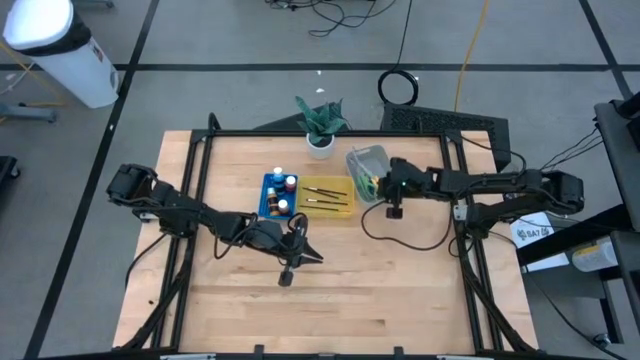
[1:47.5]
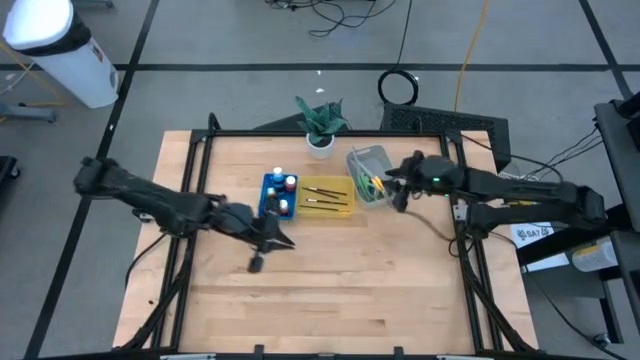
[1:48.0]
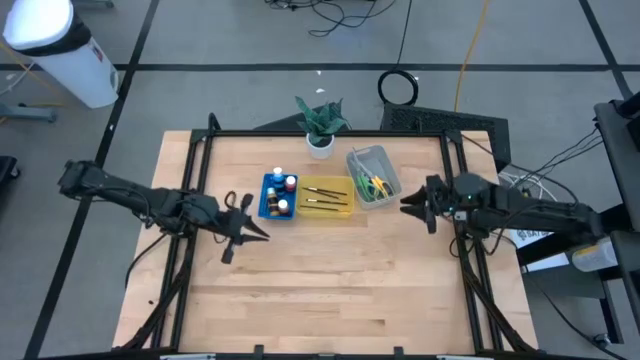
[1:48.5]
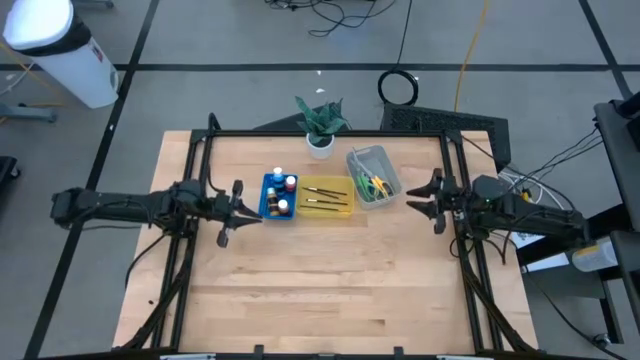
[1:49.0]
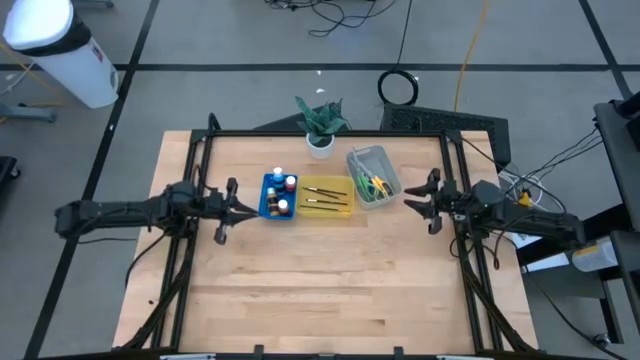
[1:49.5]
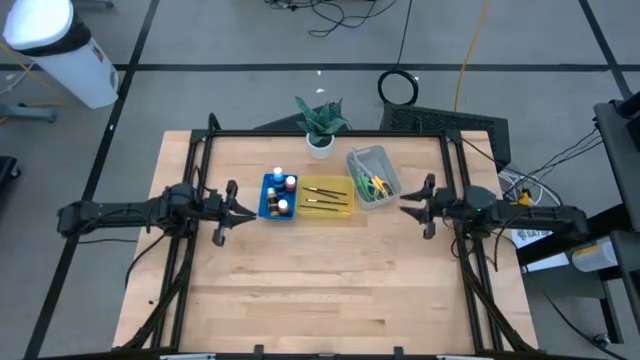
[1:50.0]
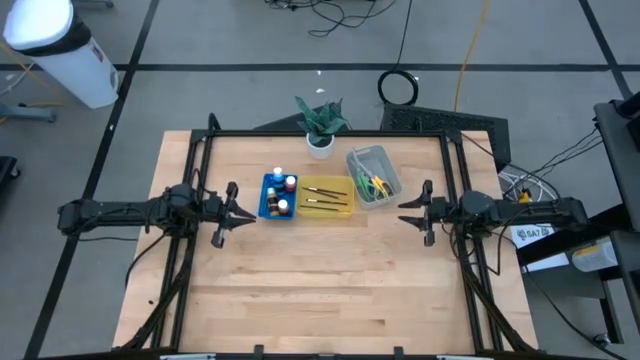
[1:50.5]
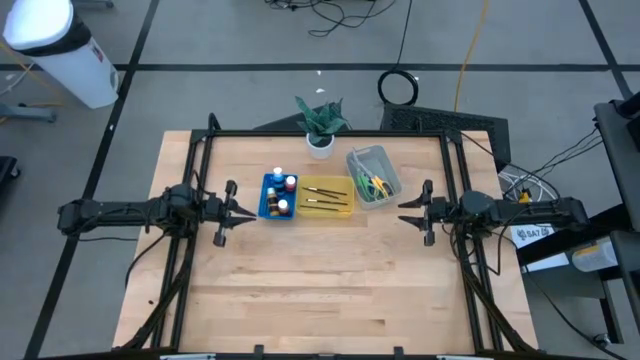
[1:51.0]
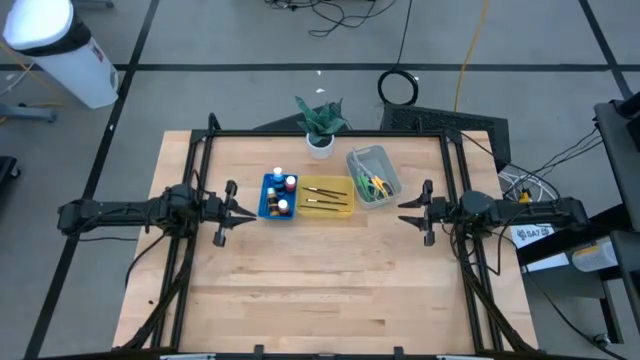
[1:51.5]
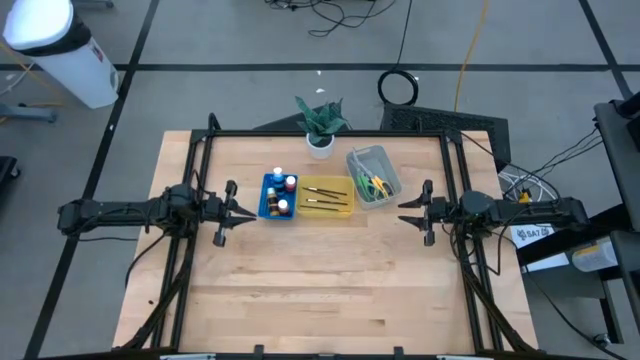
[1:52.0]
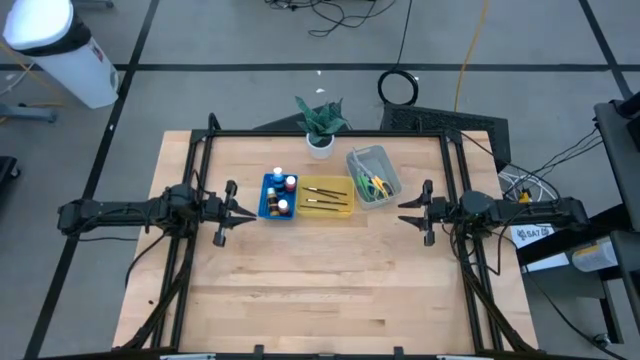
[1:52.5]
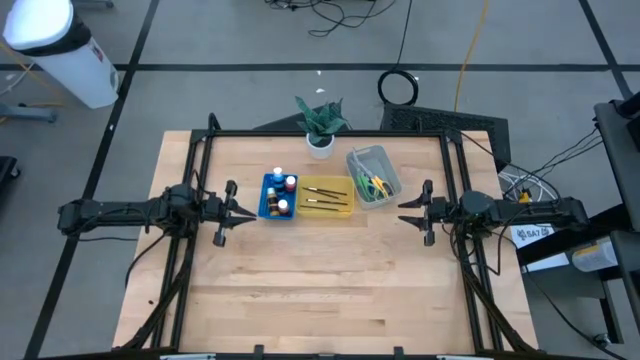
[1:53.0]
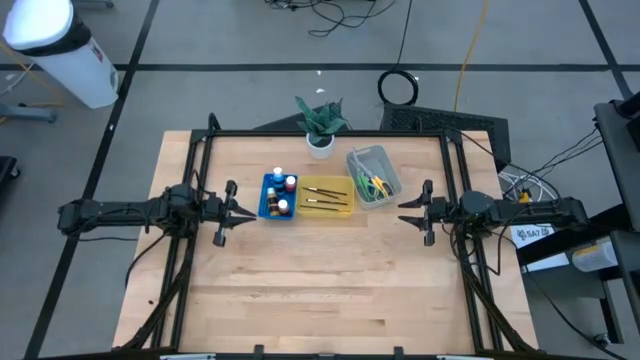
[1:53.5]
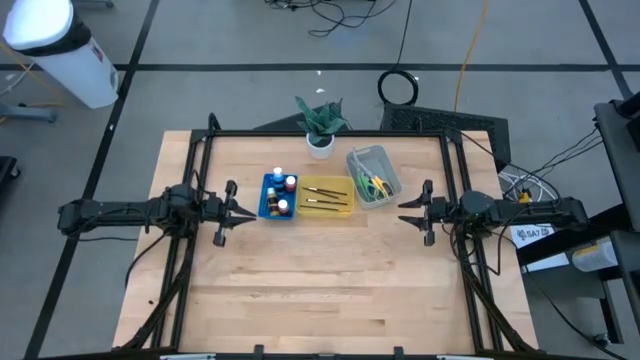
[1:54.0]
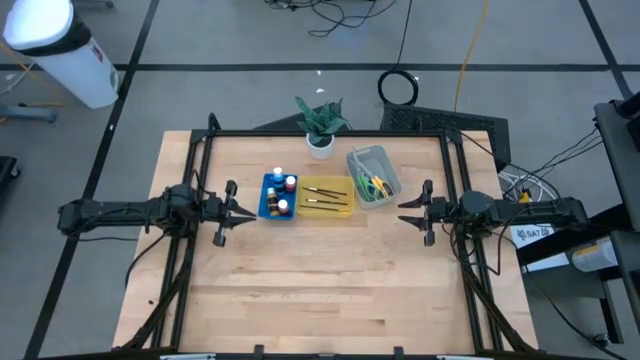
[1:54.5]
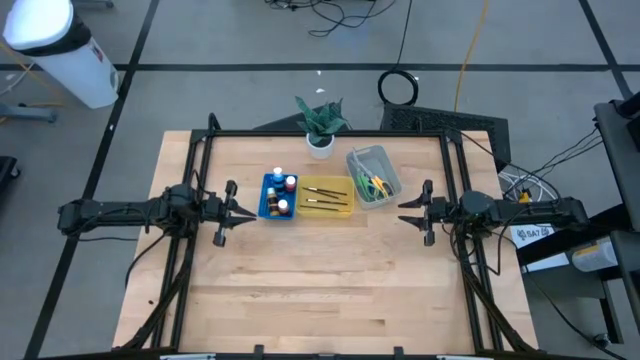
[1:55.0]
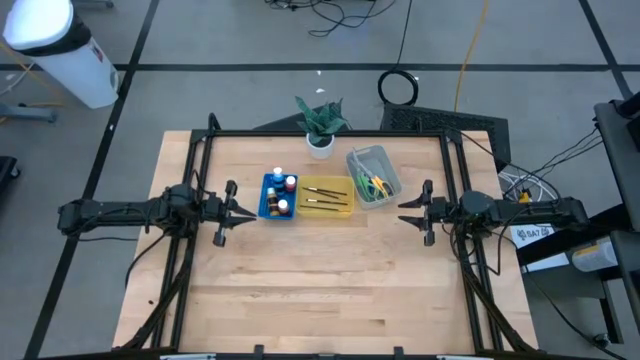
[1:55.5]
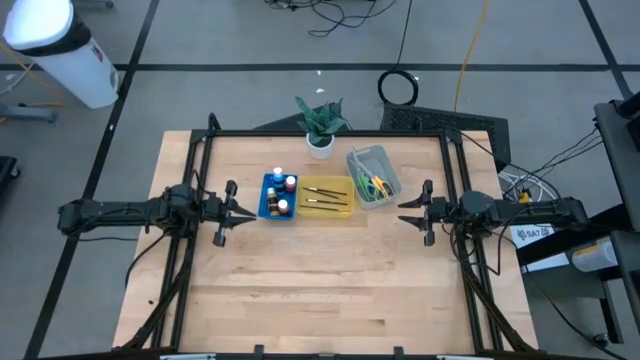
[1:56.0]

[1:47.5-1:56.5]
Task: Pick & Place Paint Supplies
Return to home position

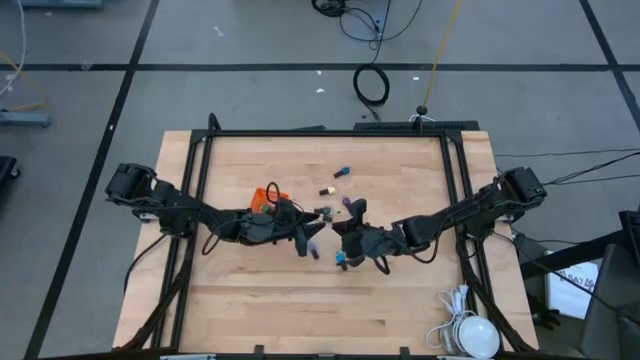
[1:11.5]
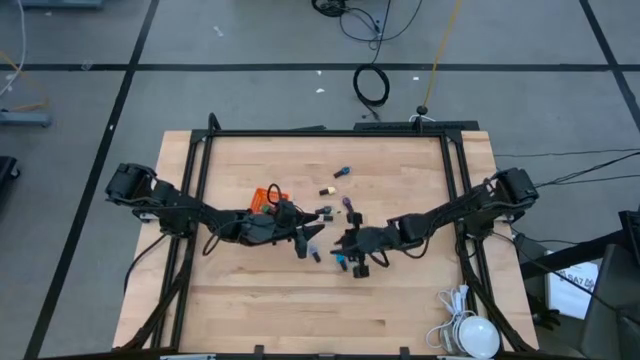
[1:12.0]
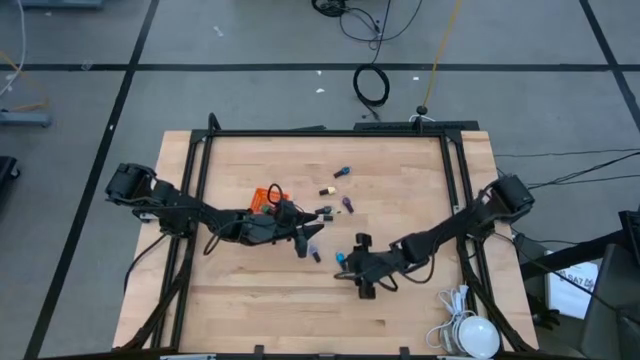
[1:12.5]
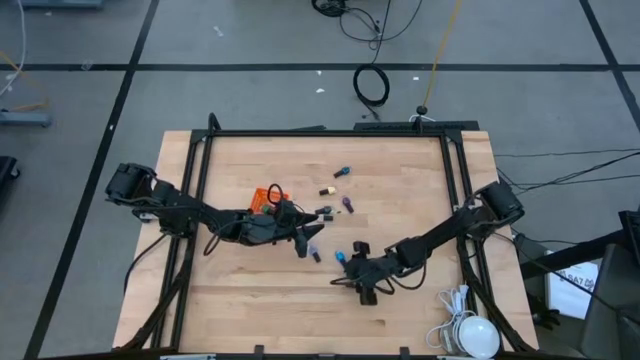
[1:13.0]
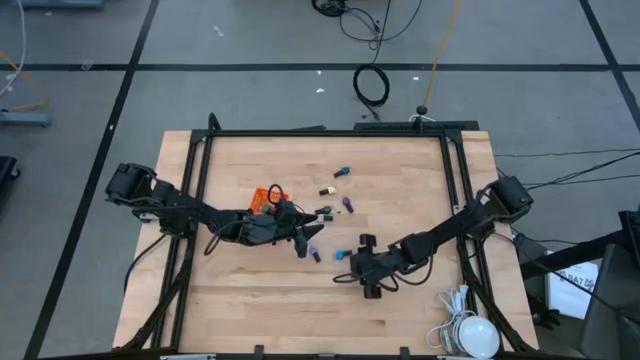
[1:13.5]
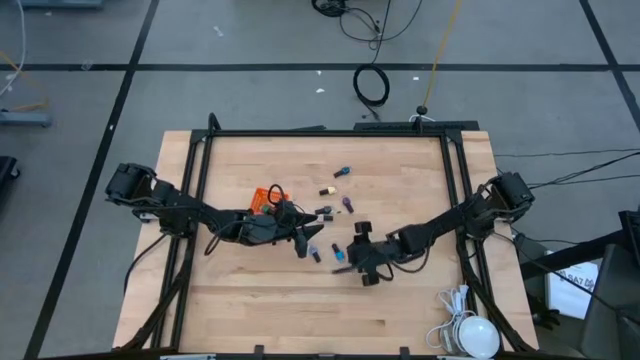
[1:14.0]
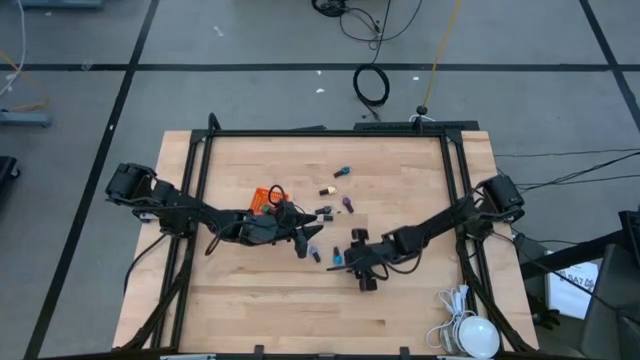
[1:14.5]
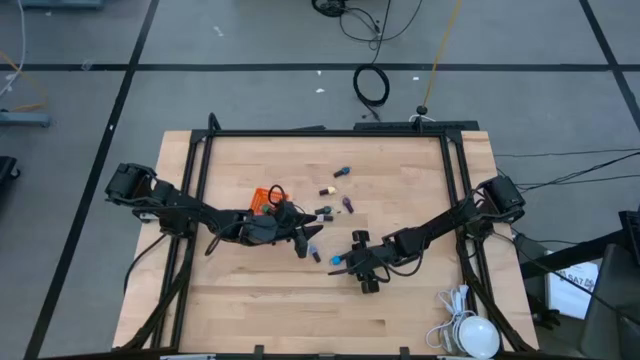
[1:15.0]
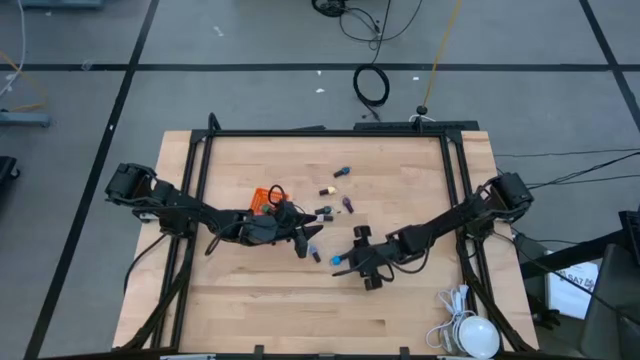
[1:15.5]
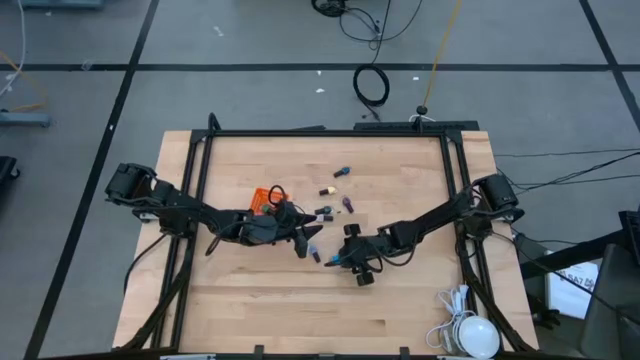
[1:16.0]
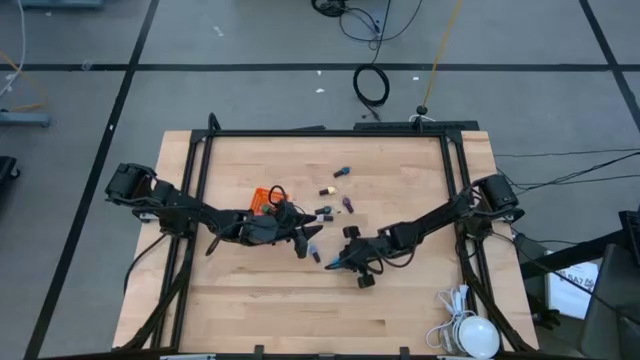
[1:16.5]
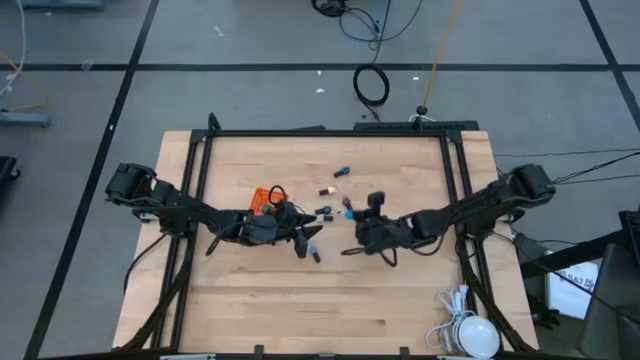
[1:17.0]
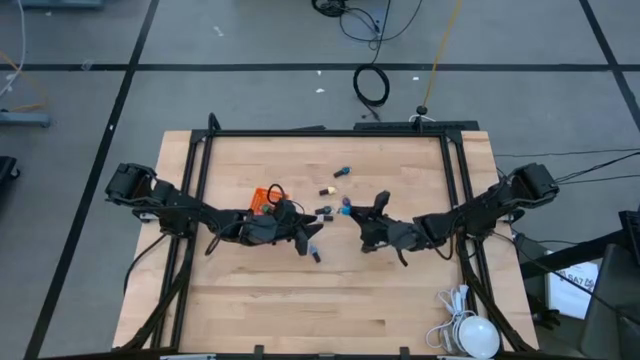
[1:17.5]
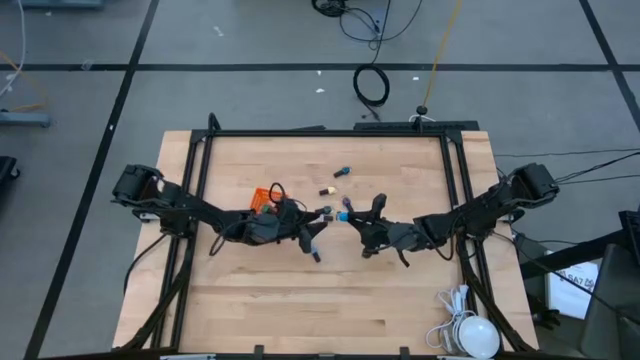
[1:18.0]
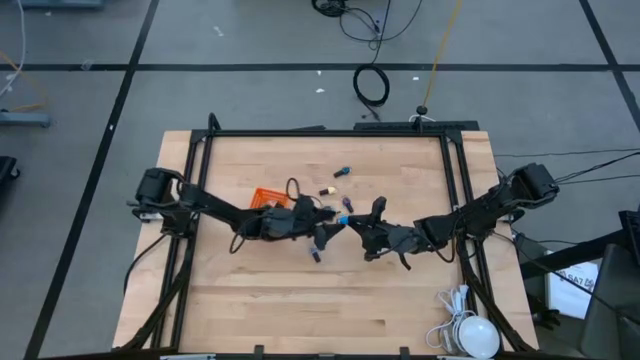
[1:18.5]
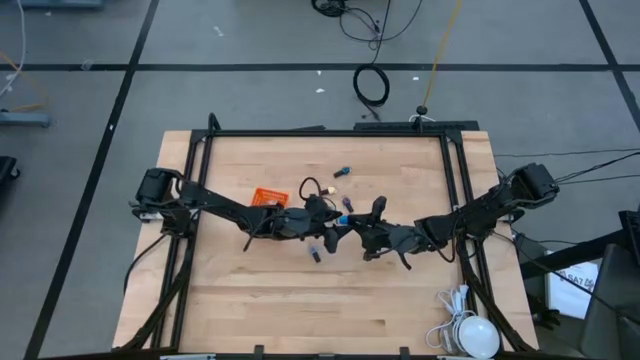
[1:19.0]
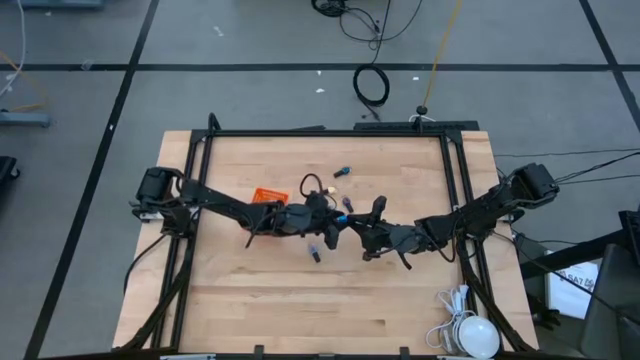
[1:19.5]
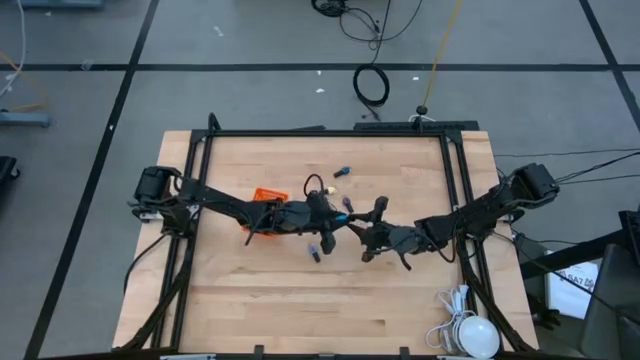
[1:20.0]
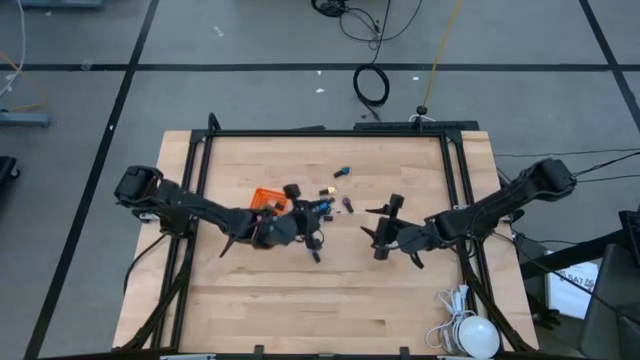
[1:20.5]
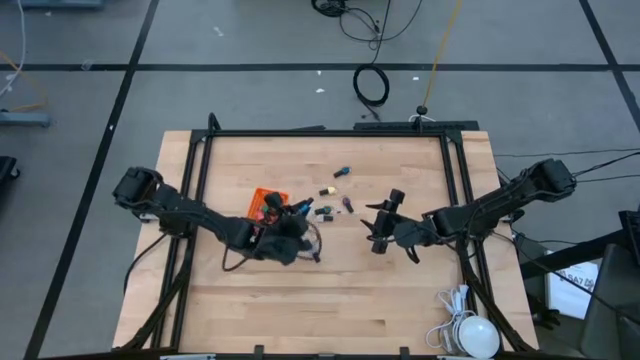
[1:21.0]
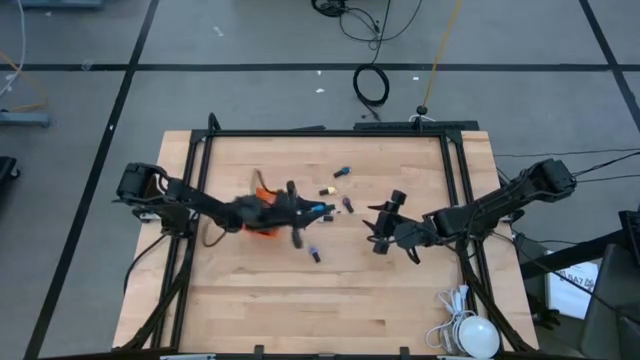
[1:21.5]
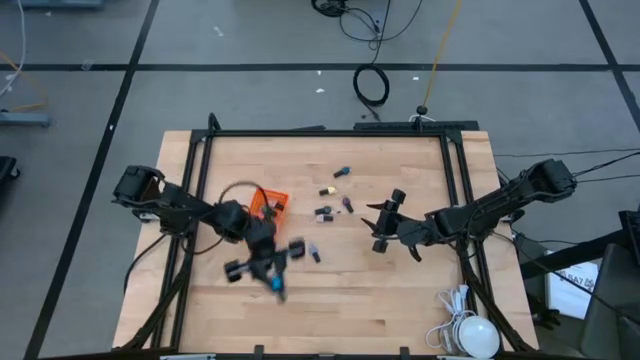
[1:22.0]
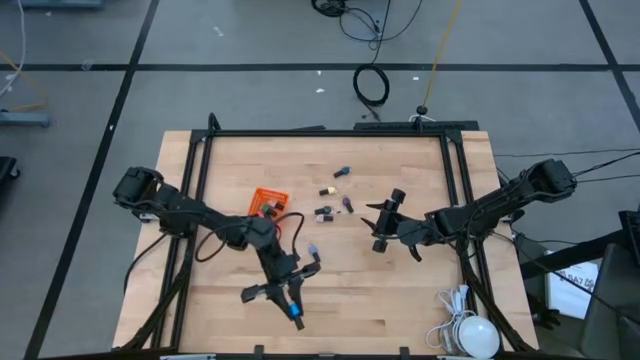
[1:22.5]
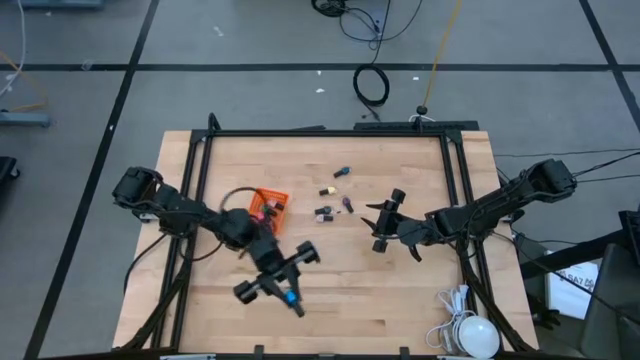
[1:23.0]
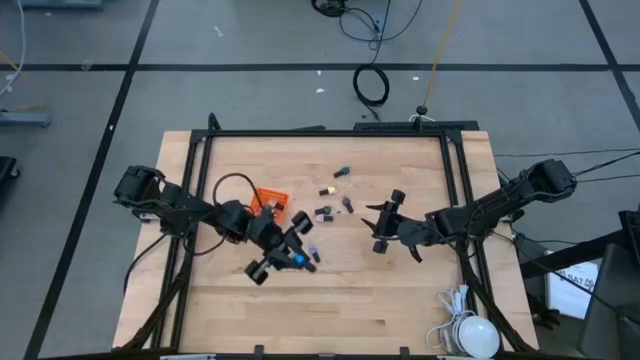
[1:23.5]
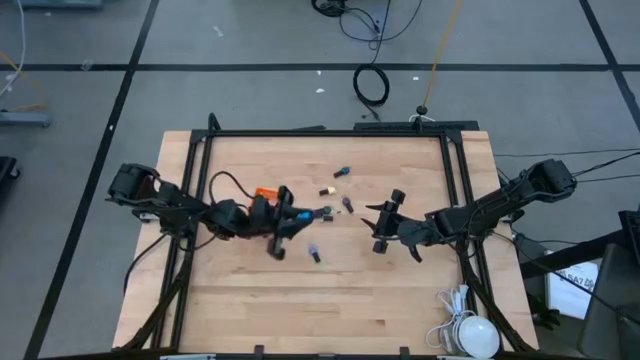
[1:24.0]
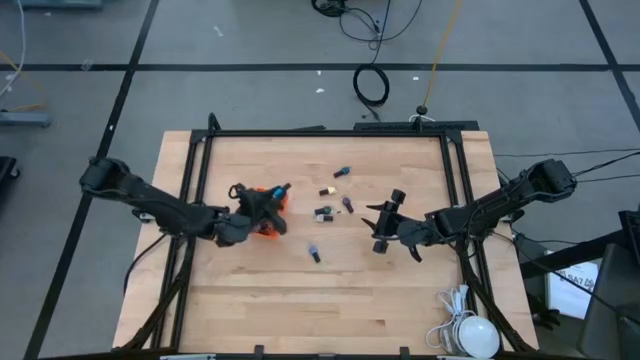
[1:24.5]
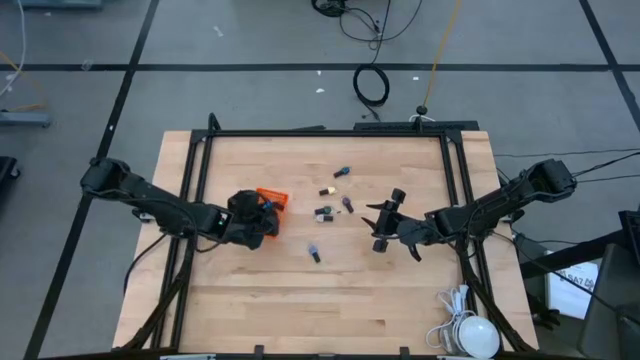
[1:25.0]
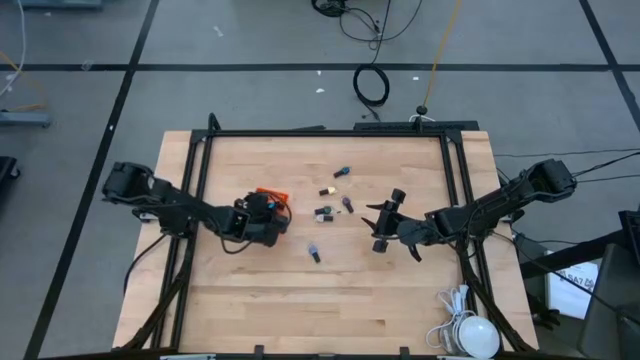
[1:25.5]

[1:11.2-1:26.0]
Task: Pick & Place Nail Polish
Put the blue nail polish into the orange basket
